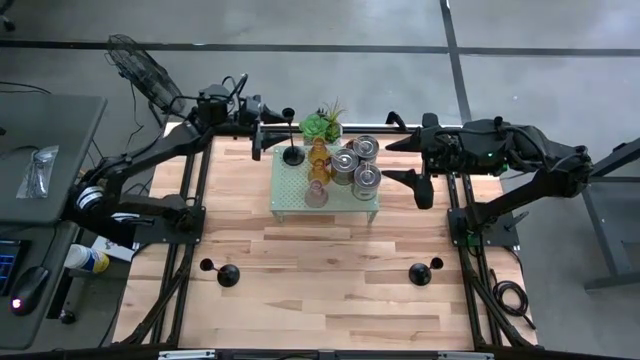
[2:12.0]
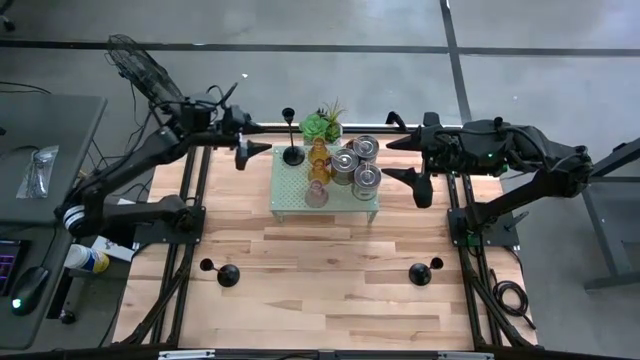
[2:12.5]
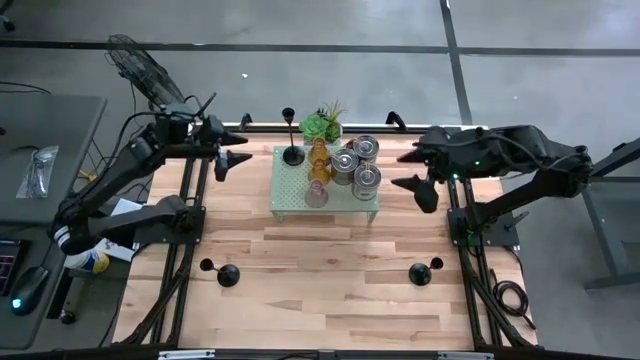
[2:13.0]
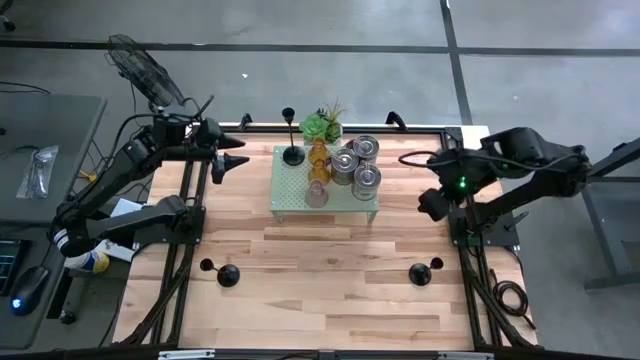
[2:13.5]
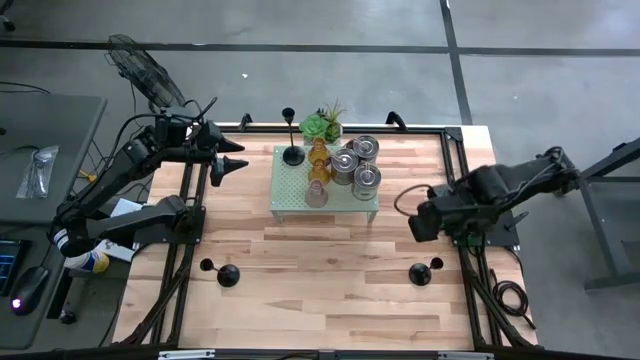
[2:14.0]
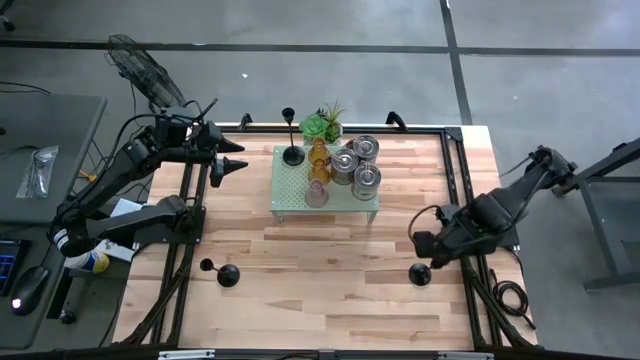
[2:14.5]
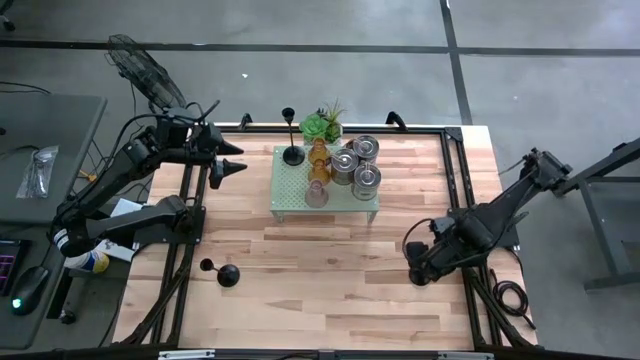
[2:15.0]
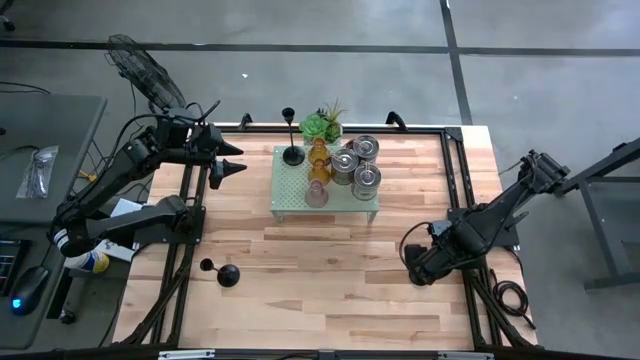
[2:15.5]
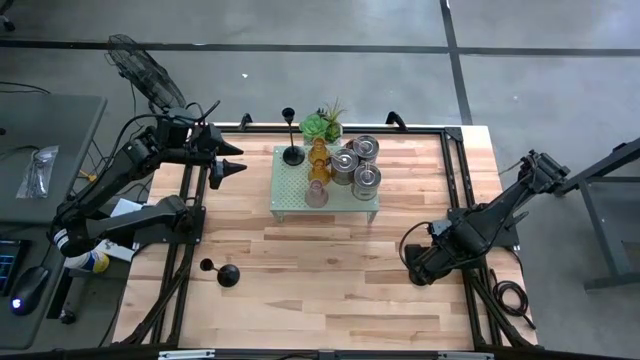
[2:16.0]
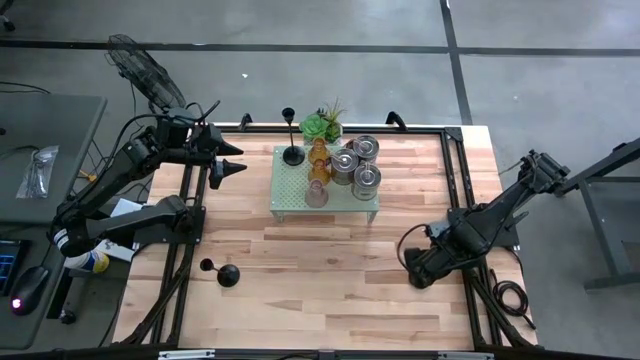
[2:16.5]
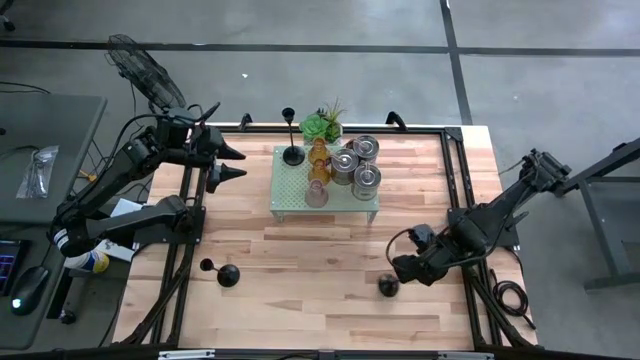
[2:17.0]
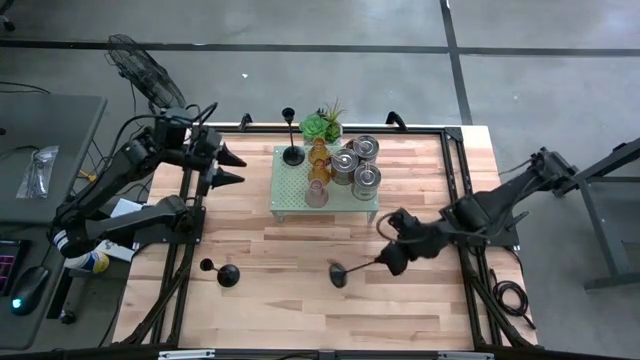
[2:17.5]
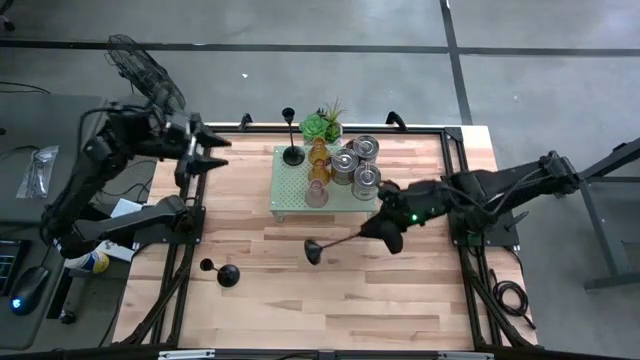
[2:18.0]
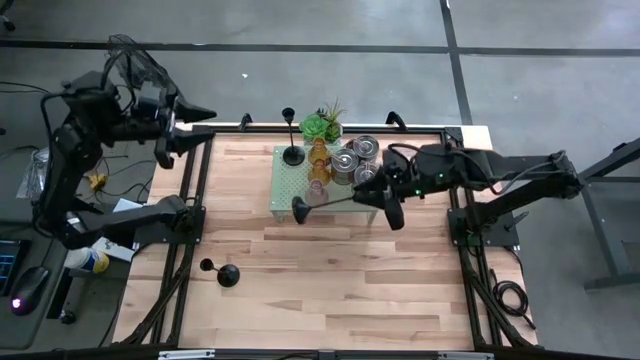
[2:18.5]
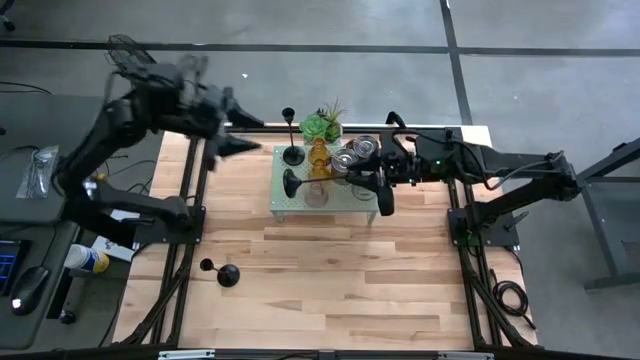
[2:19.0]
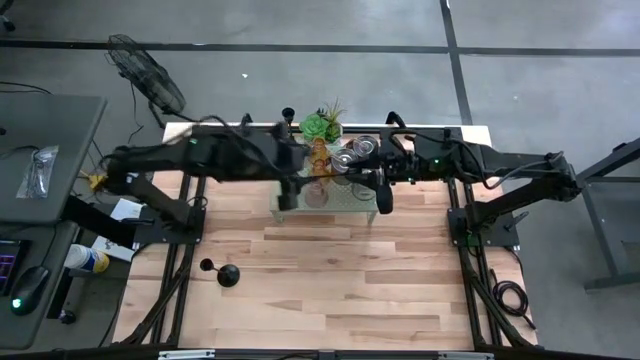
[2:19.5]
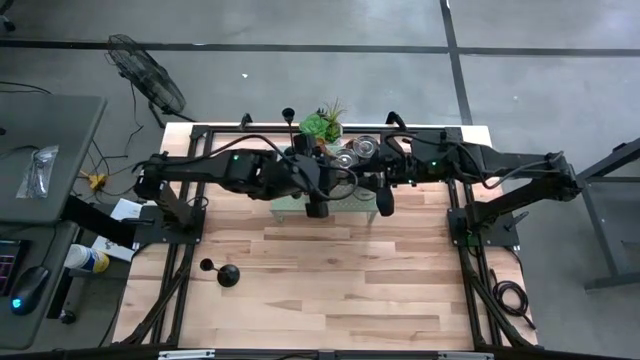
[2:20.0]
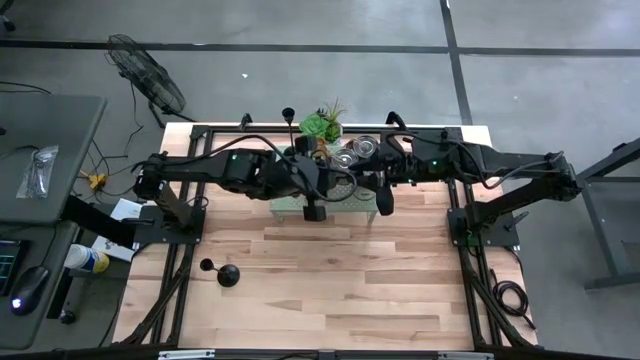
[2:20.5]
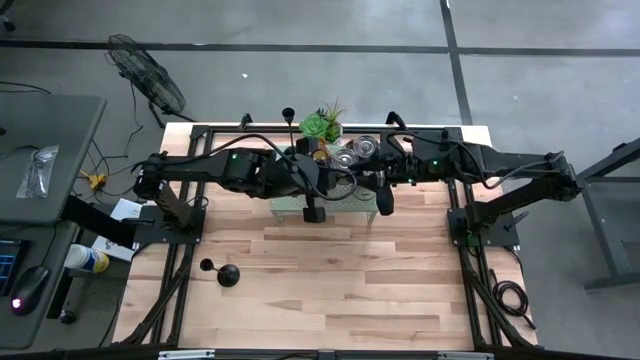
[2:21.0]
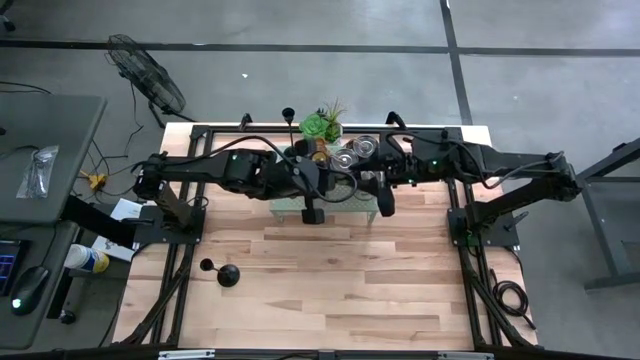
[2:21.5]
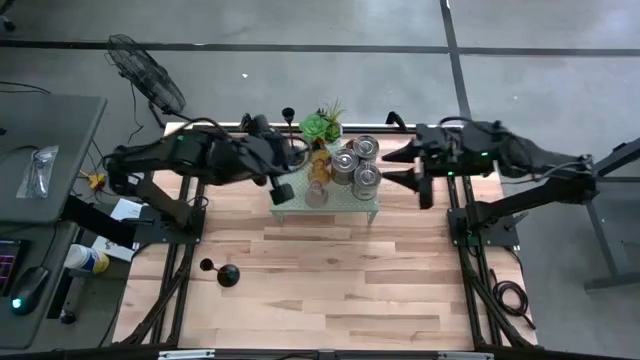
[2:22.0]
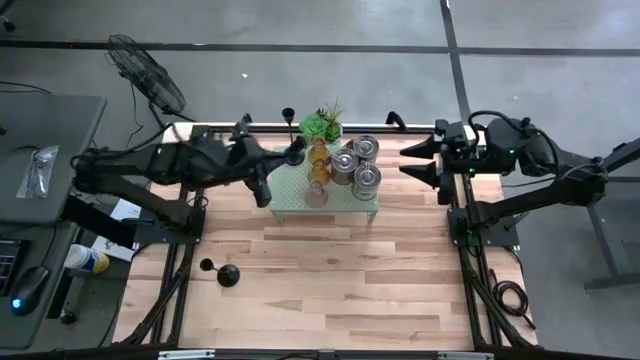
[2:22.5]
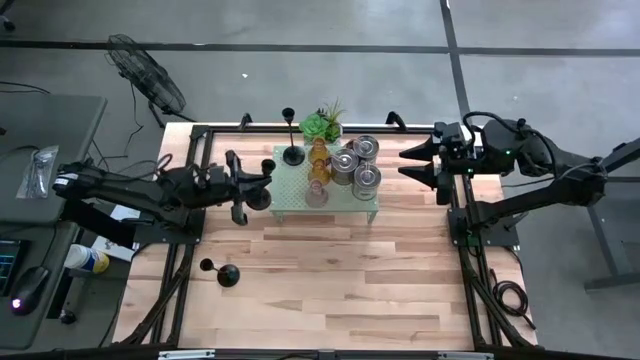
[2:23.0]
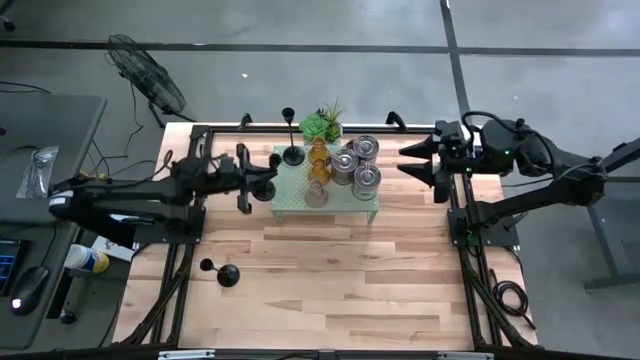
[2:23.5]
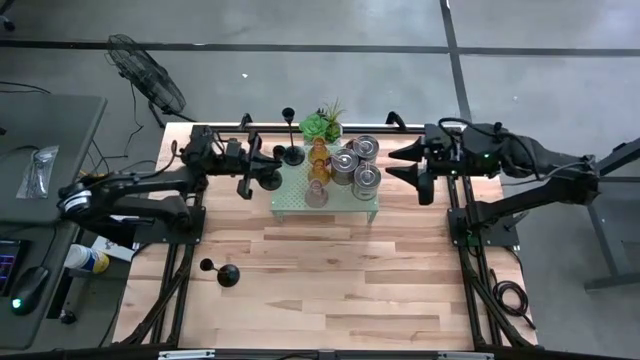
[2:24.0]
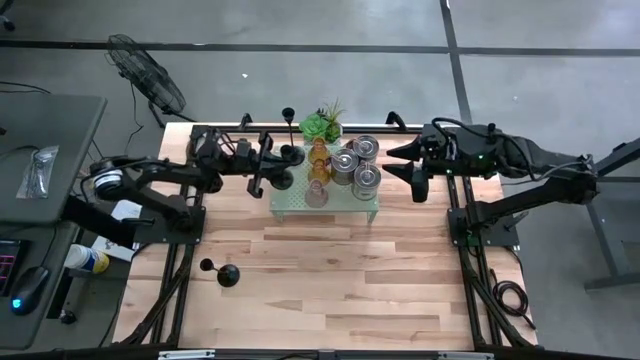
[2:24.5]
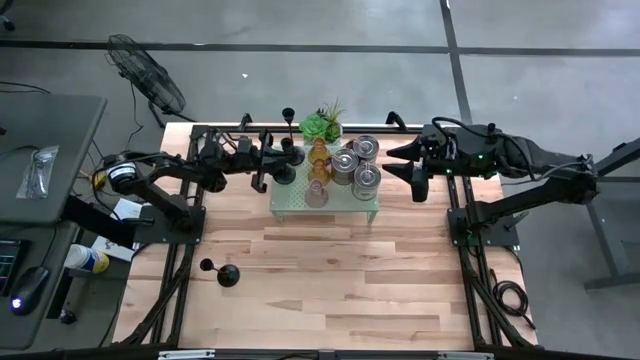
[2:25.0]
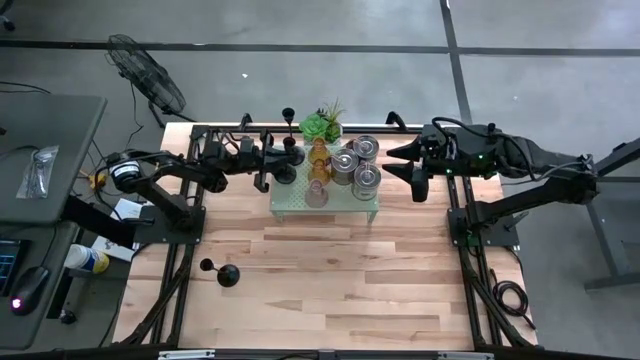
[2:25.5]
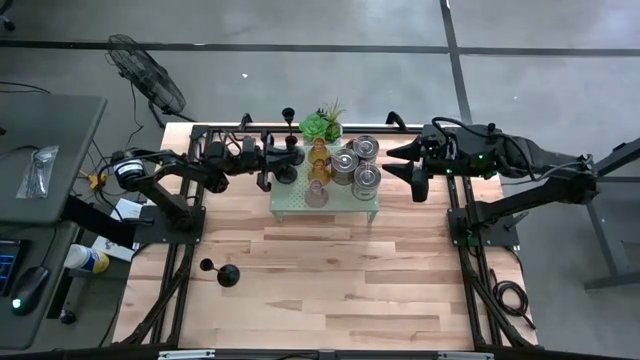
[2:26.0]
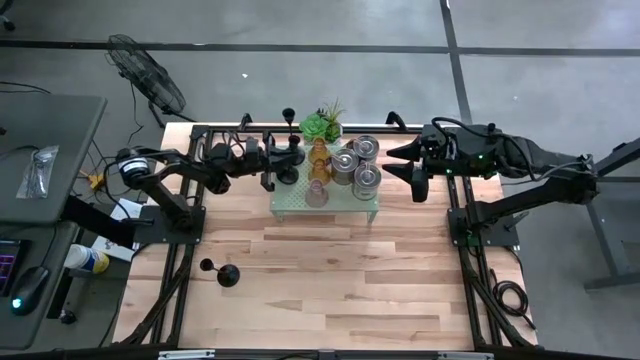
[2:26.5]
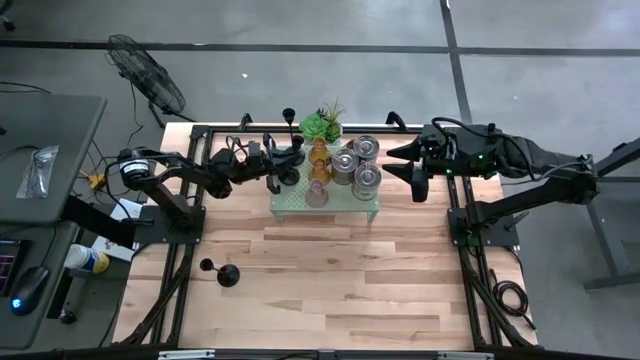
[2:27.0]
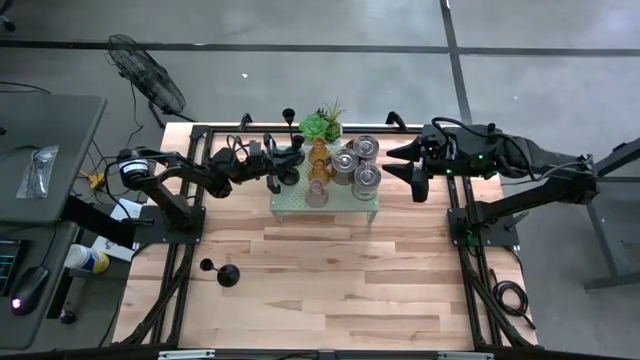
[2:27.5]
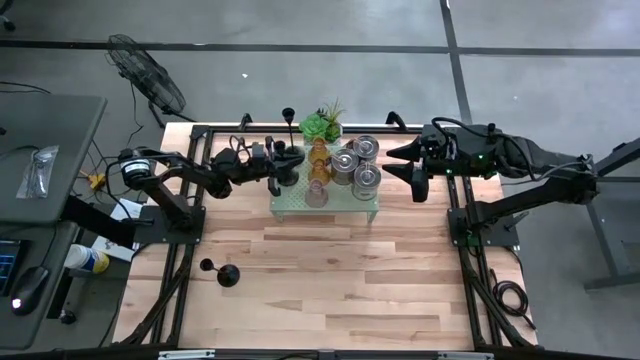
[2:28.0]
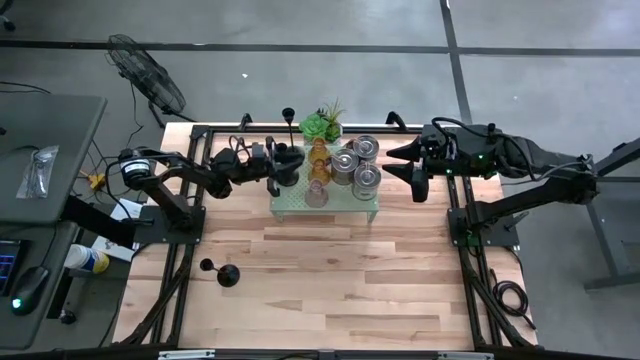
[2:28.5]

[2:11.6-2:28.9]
Task: Pick & Place candle stick holders
Put the right black candle holder on the shelf

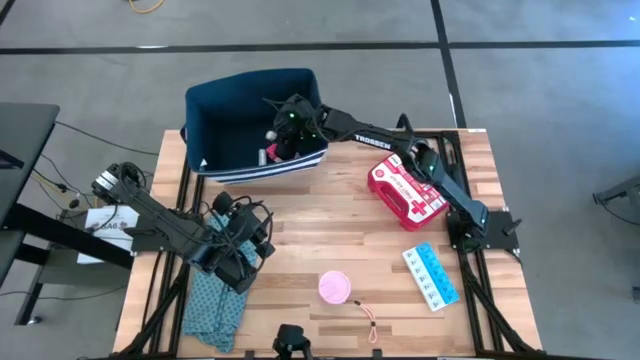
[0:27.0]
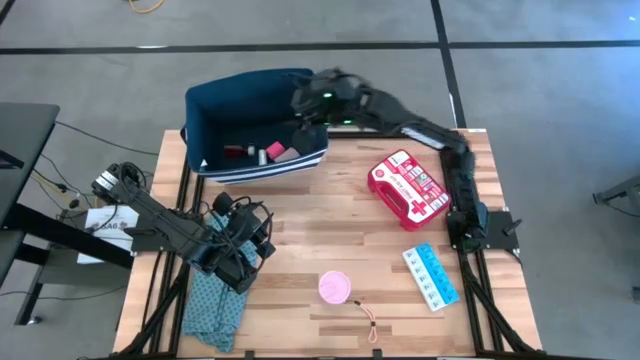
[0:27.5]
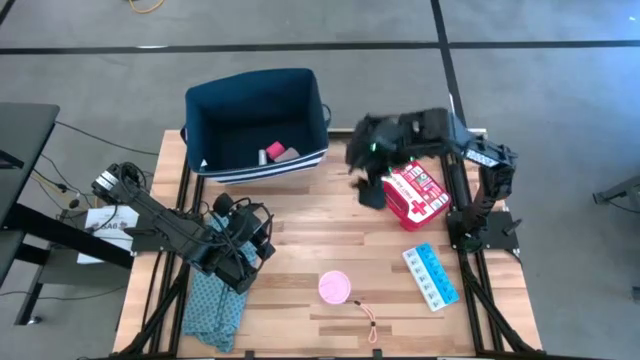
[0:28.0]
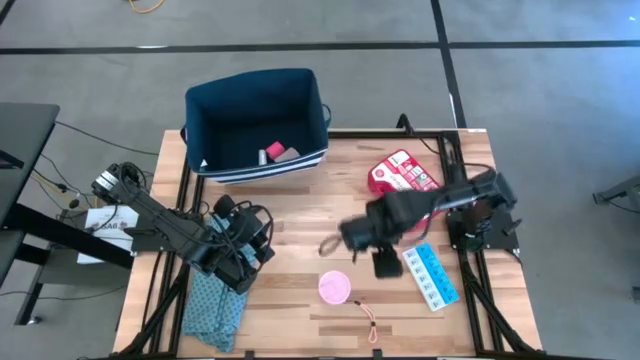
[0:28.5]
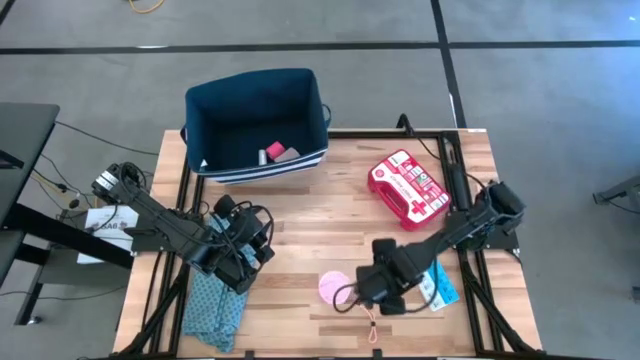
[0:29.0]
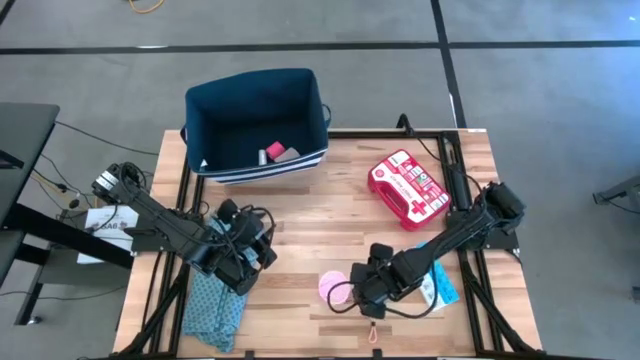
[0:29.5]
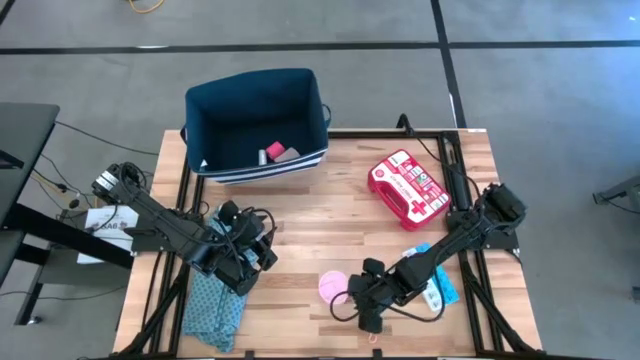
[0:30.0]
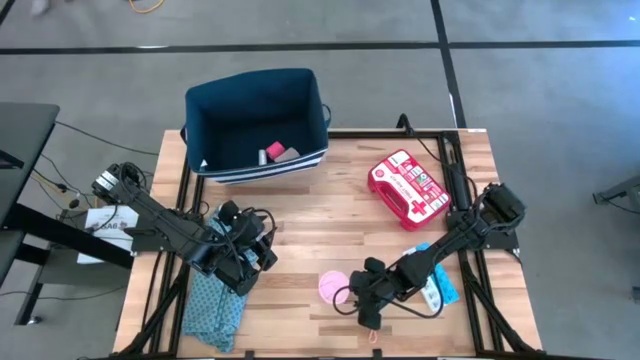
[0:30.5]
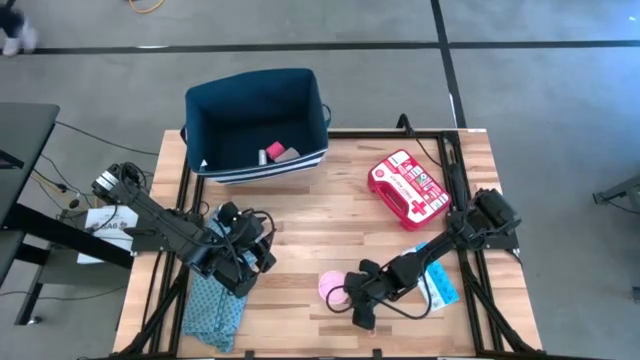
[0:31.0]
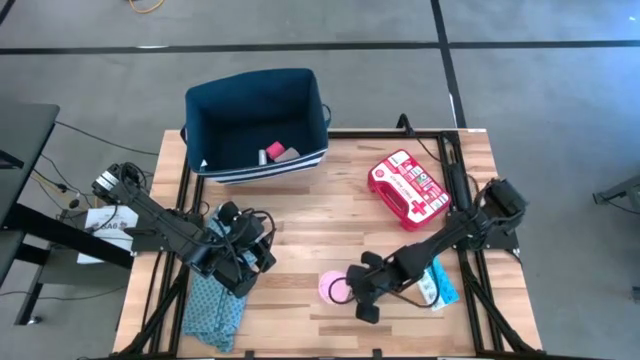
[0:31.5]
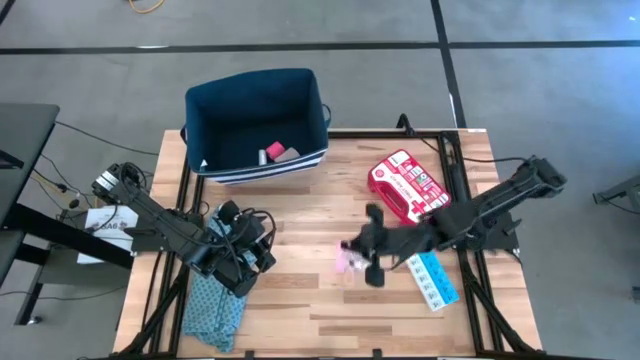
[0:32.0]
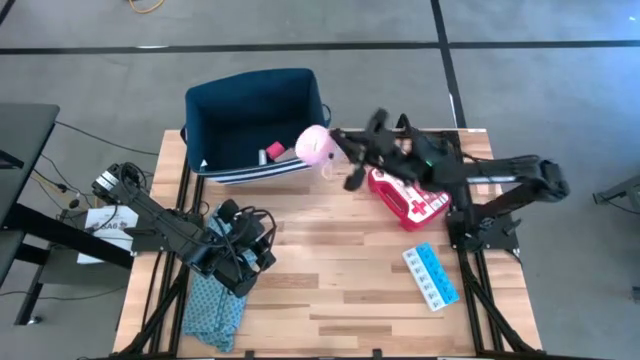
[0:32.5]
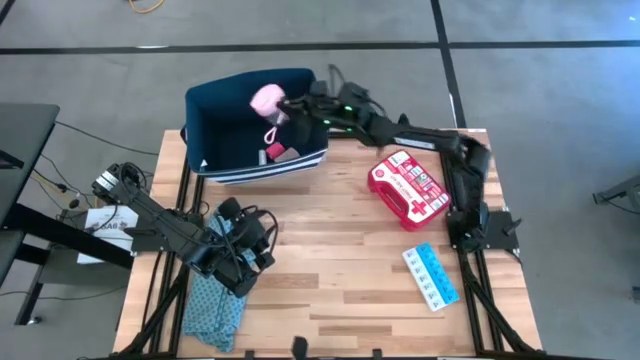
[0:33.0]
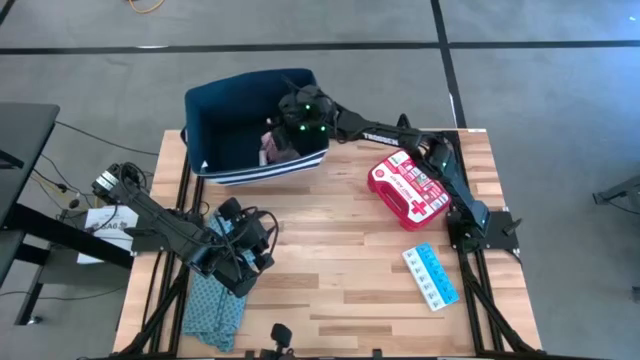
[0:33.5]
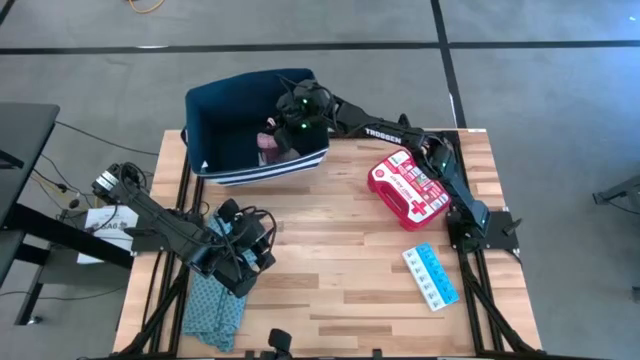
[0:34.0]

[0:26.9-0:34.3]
Task: Pick & place medical supplies in basket/bin
Put the pink pill dispenser into theblue bin
